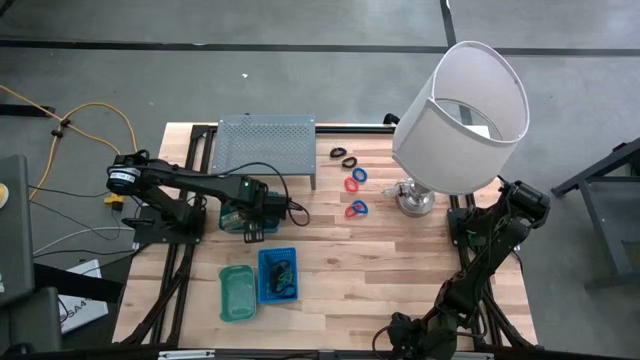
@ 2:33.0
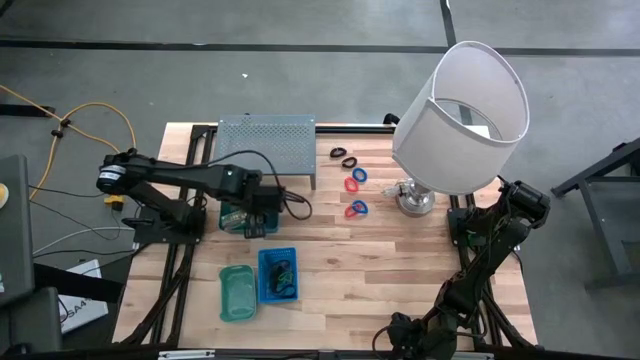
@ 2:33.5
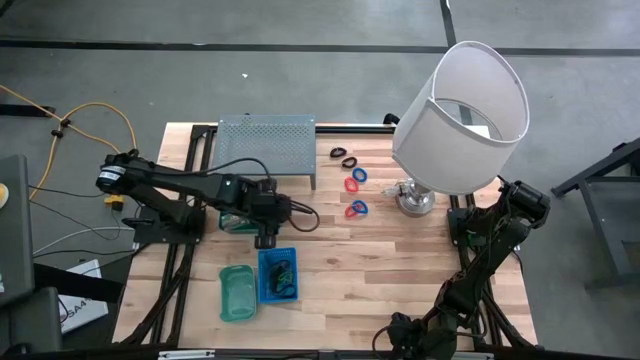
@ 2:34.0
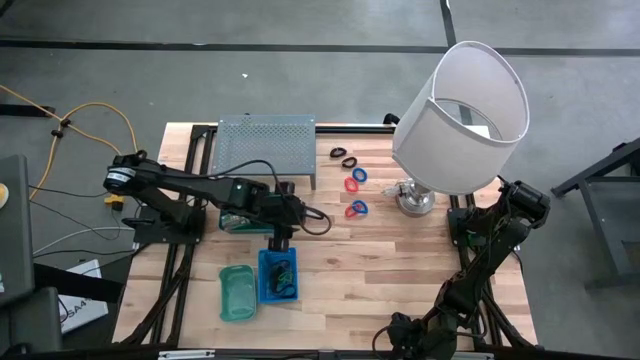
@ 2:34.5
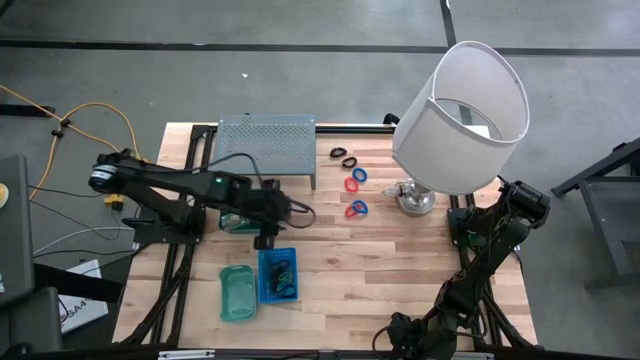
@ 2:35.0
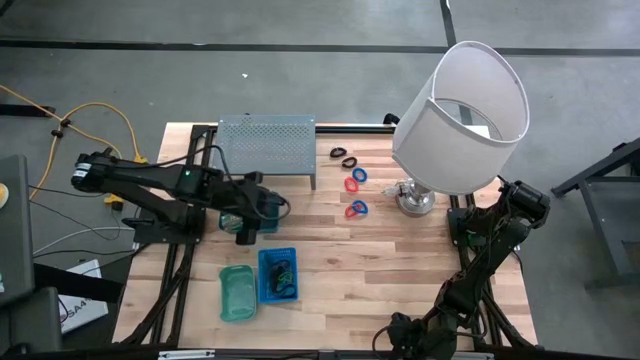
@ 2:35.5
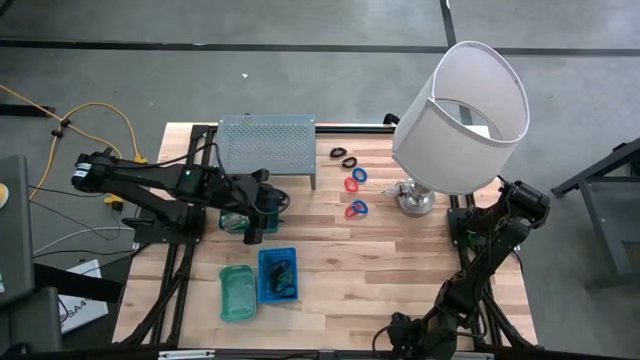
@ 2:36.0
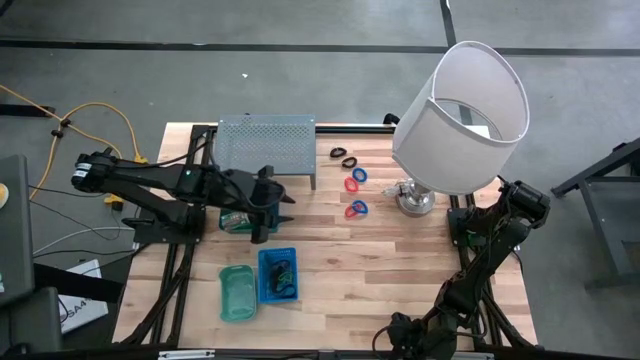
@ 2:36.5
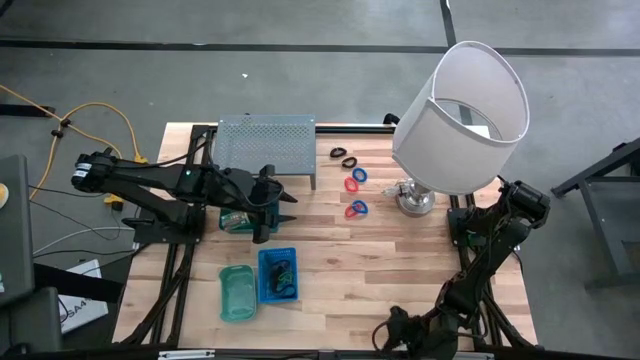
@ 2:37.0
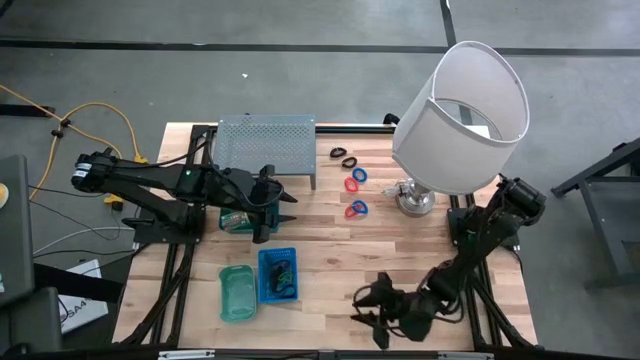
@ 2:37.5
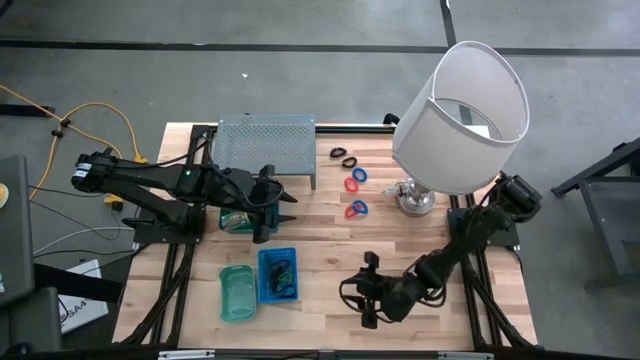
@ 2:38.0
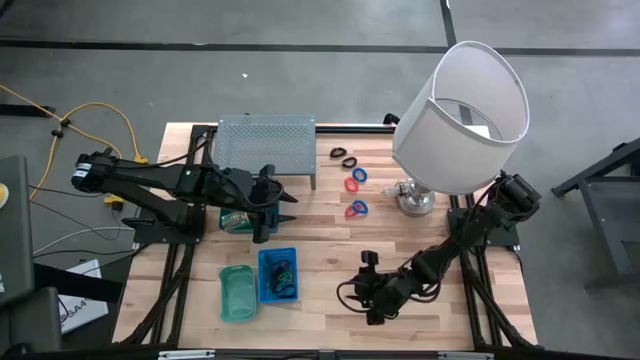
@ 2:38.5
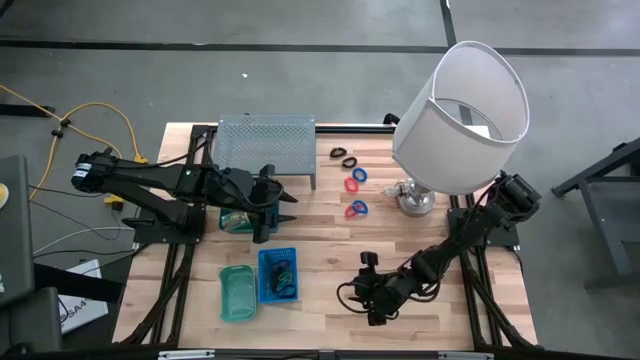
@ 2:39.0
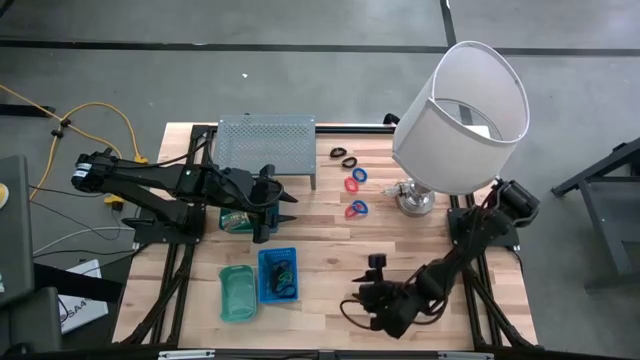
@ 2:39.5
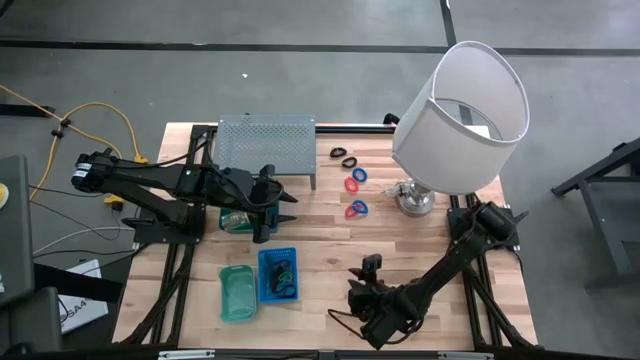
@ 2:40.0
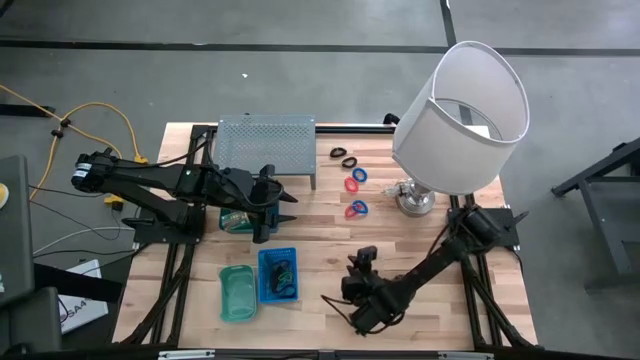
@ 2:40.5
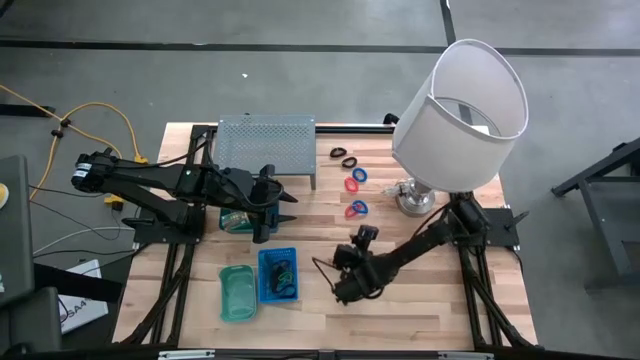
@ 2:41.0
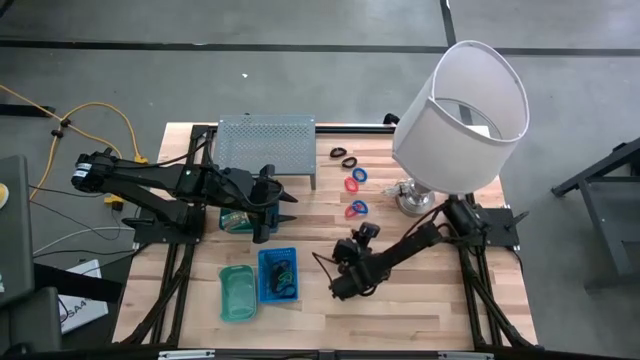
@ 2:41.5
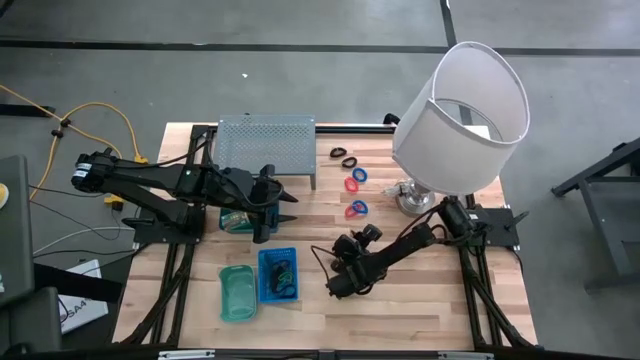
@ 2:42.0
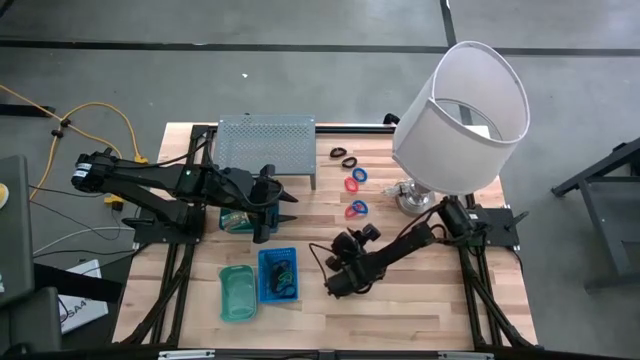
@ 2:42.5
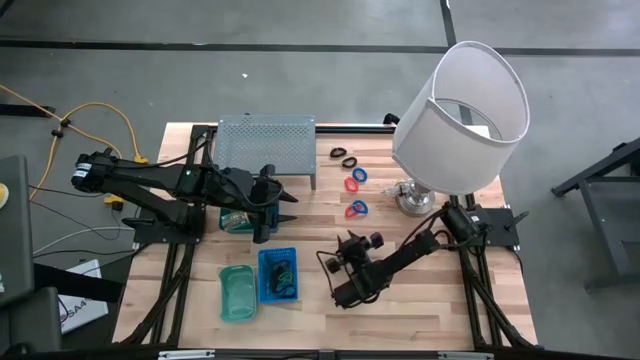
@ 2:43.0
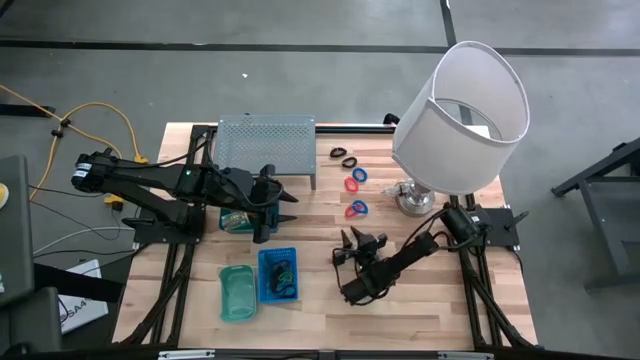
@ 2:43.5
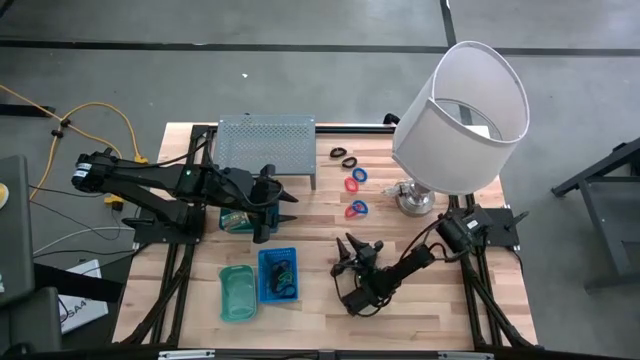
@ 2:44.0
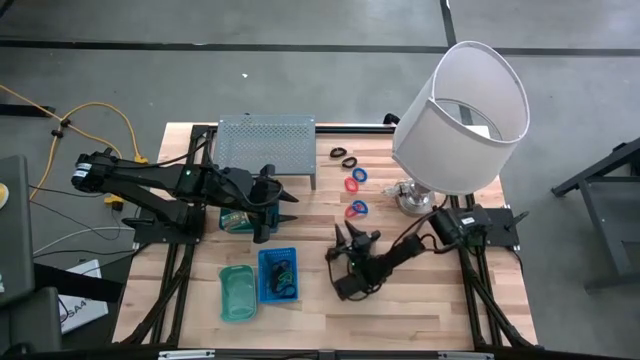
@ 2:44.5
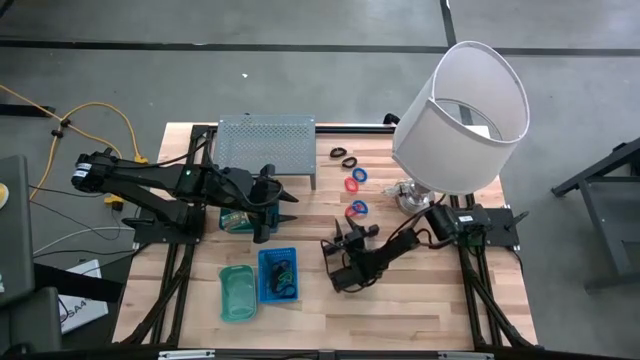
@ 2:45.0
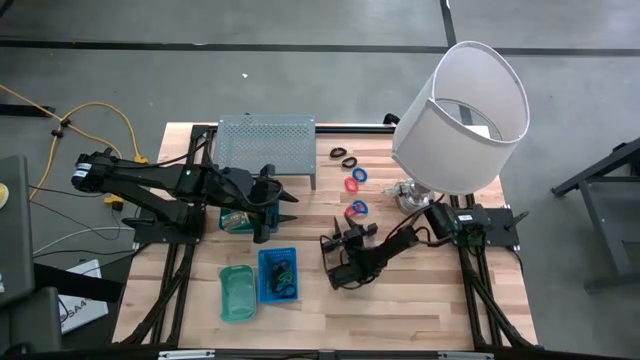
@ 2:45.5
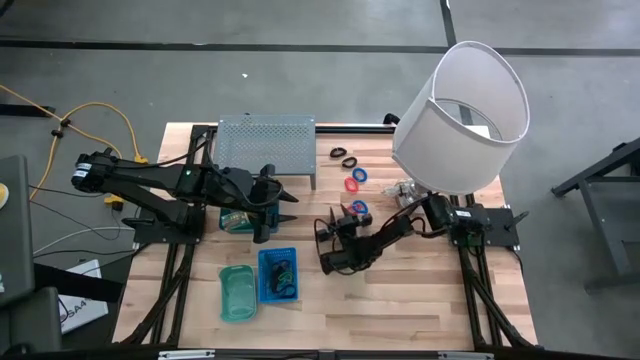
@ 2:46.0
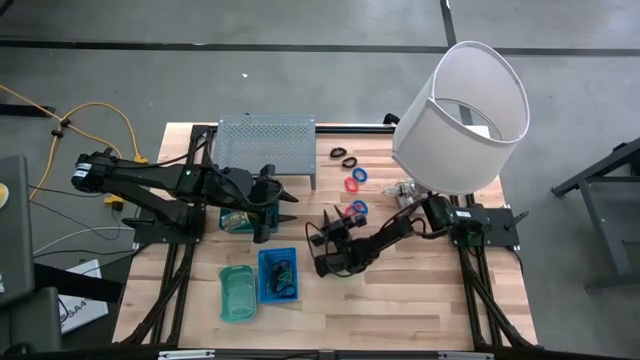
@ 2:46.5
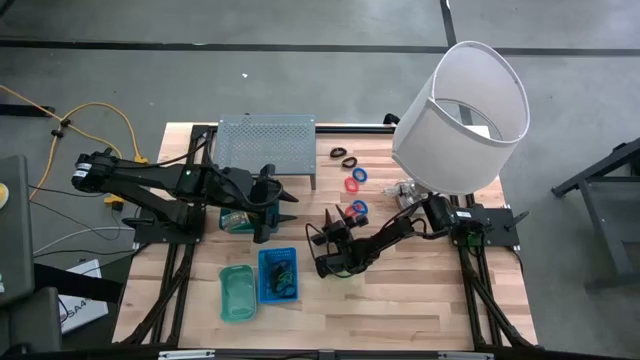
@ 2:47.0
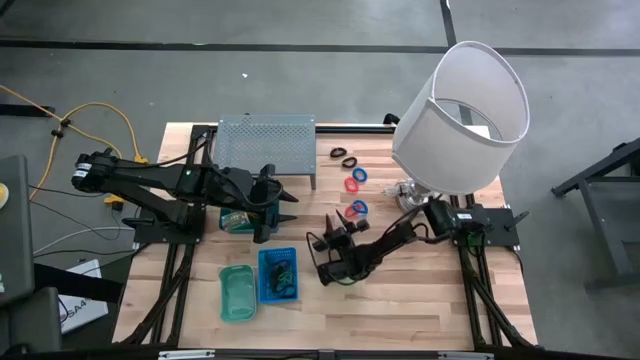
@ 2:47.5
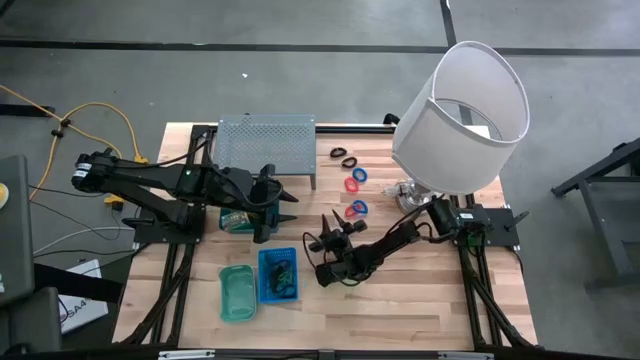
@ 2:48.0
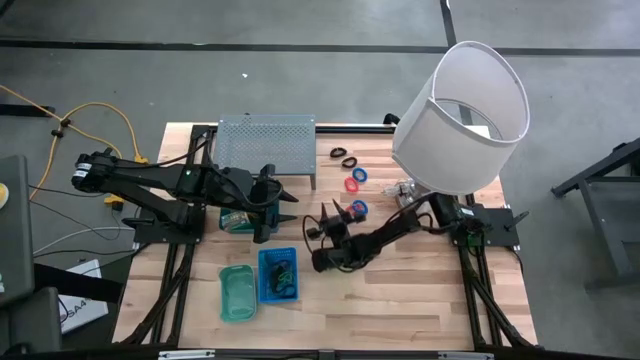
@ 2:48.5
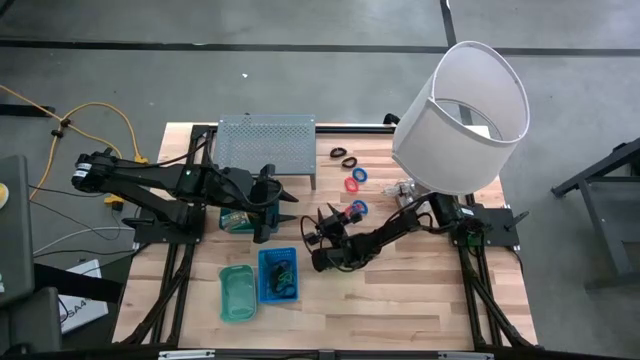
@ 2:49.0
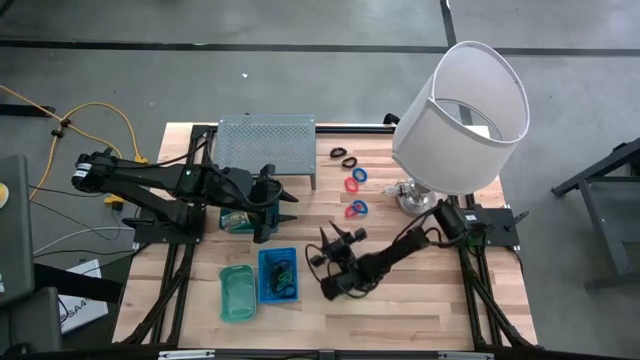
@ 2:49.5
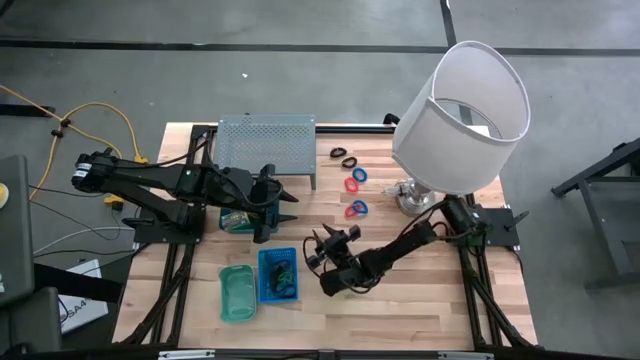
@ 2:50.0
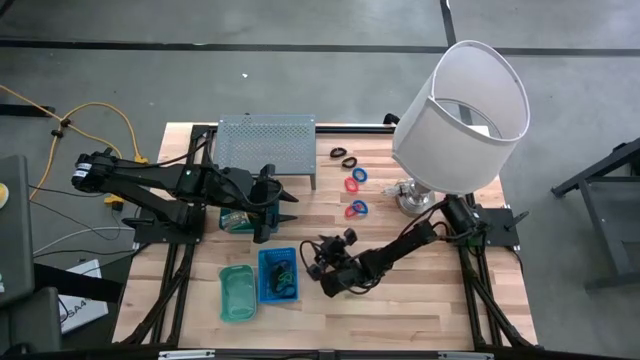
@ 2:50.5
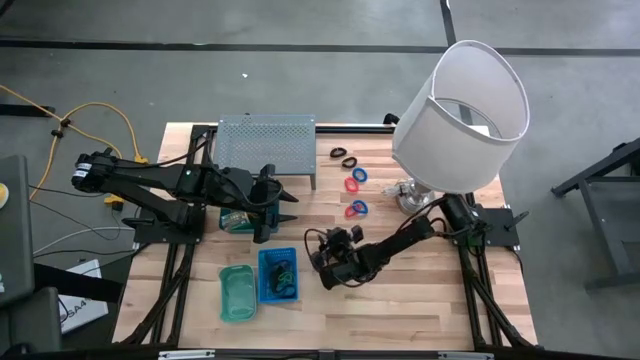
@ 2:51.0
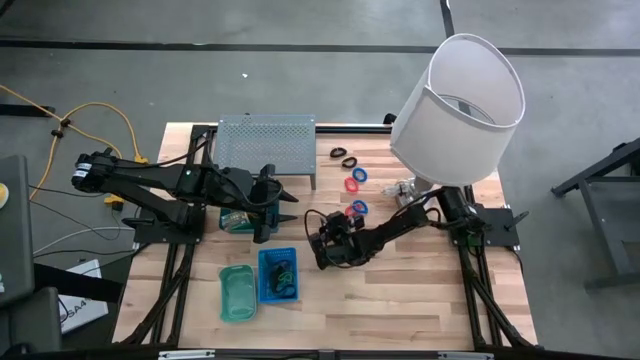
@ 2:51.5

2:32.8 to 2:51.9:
Task: Pick & Place Office Desk Supplies
Put the bottom orange spring keychain into the green bin

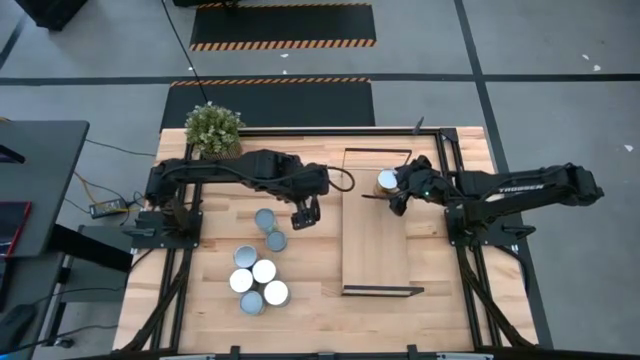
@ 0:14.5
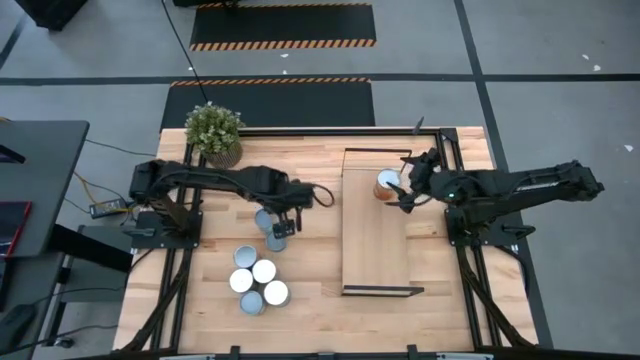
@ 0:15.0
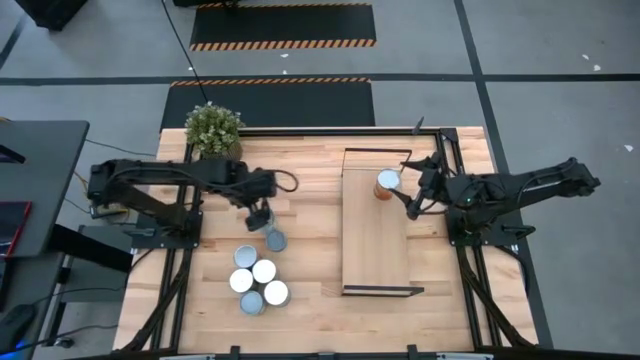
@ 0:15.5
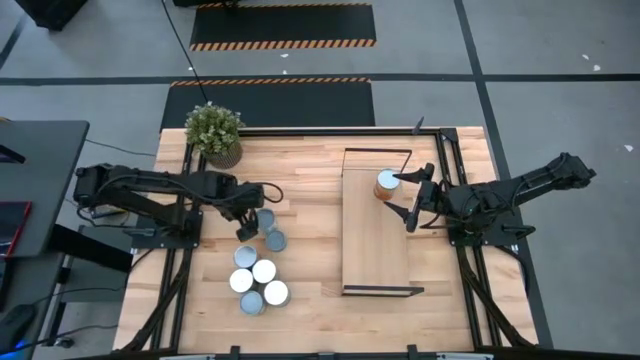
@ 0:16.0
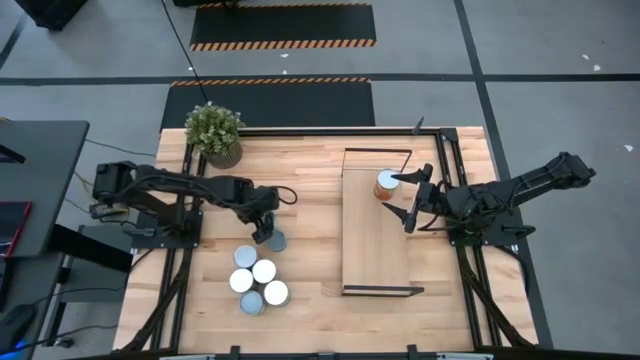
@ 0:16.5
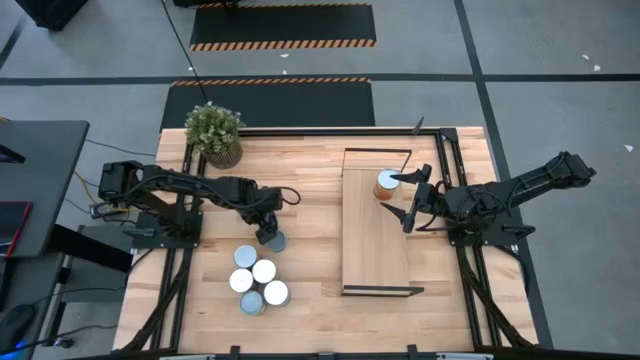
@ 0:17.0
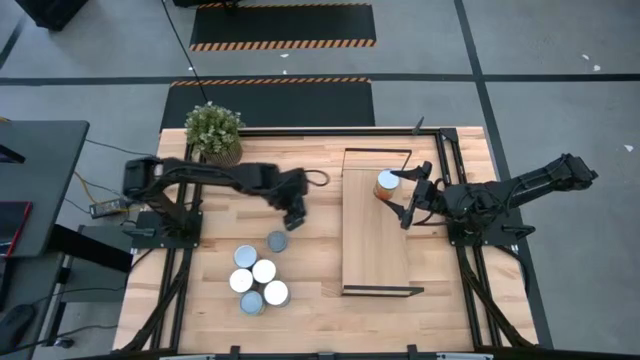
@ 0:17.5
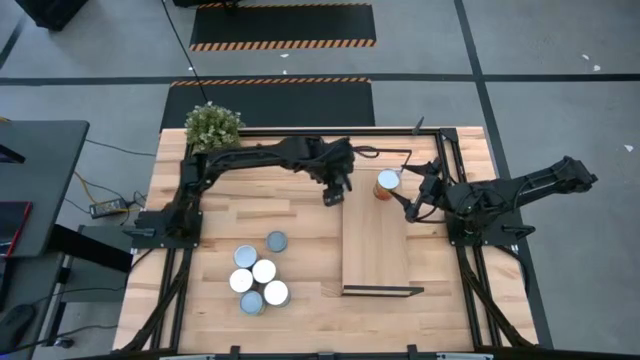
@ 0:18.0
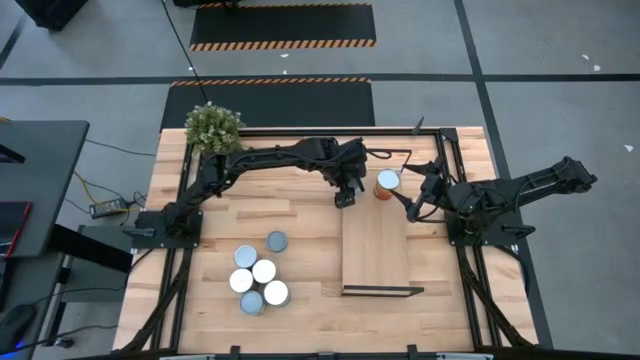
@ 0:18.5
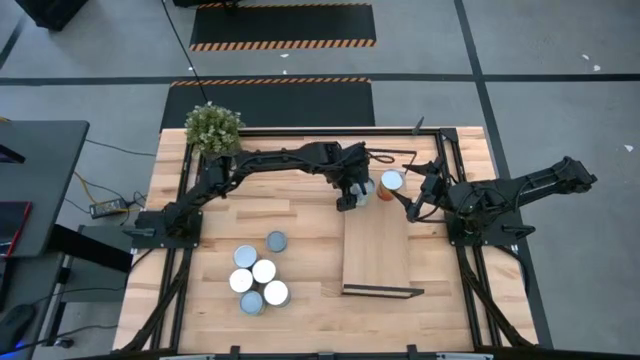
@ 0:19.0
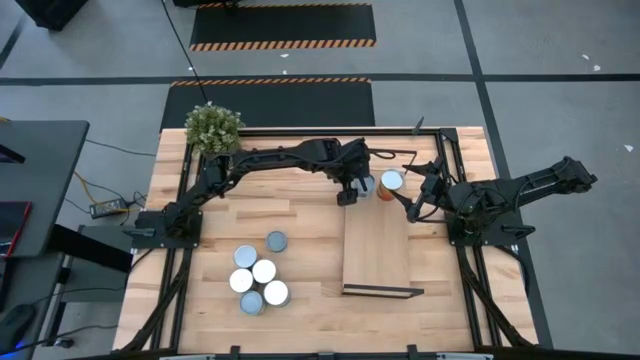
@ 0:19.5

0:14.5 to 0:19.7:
Task: Pick and place cans onto a shelf
Put the canned mix vegetables on the shelf
